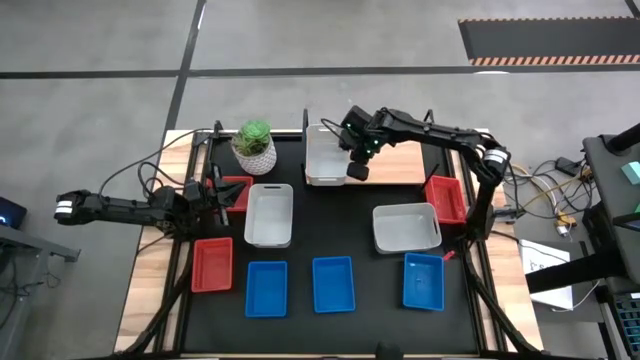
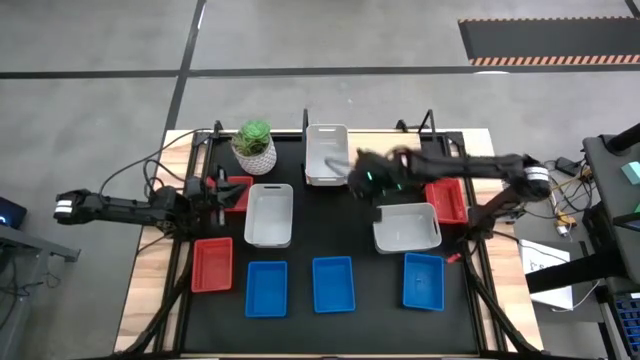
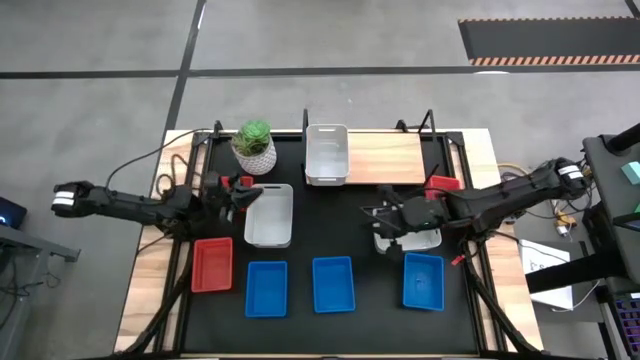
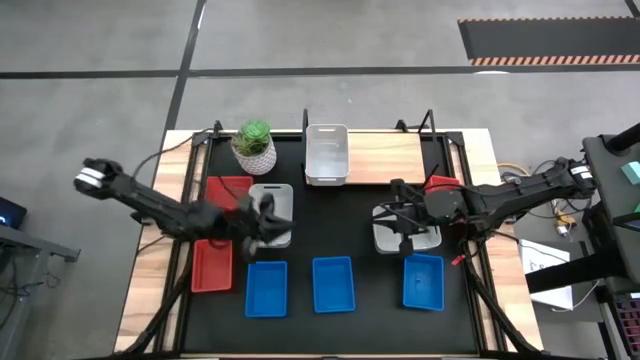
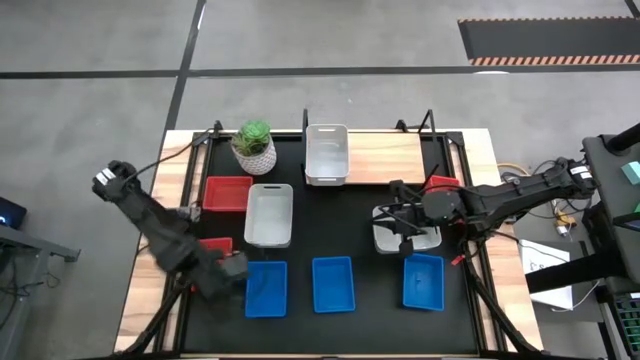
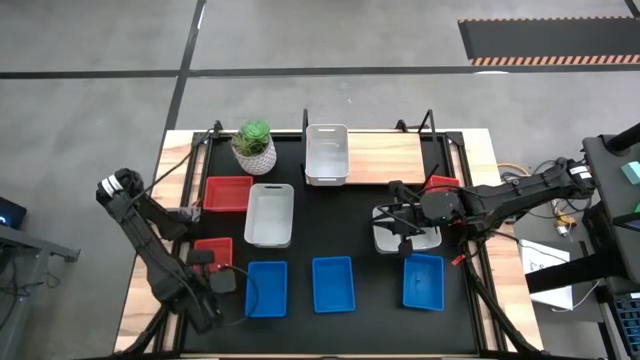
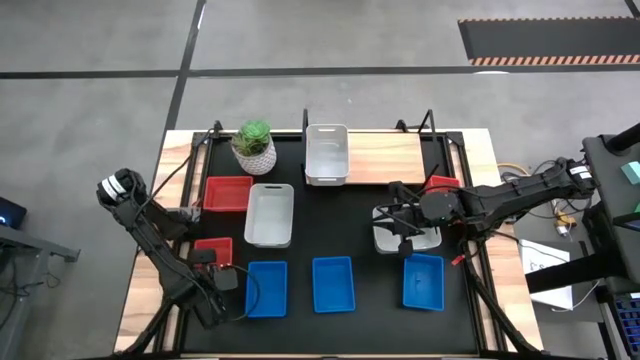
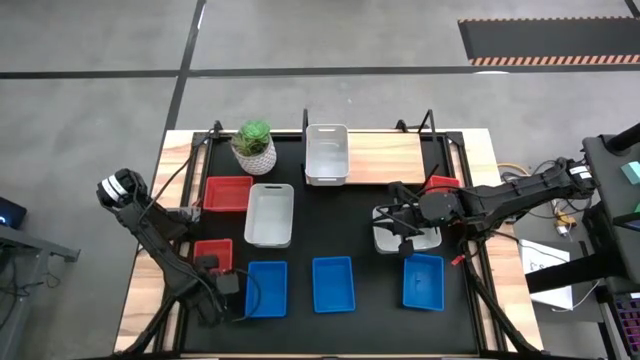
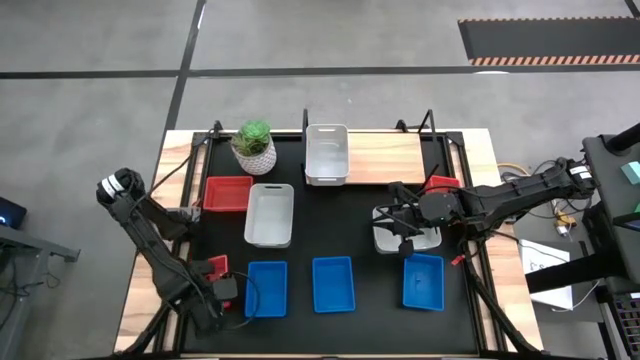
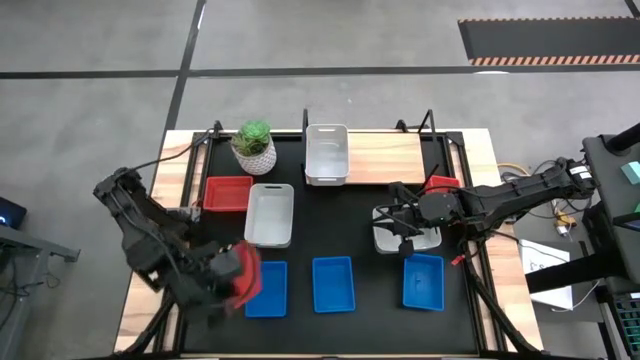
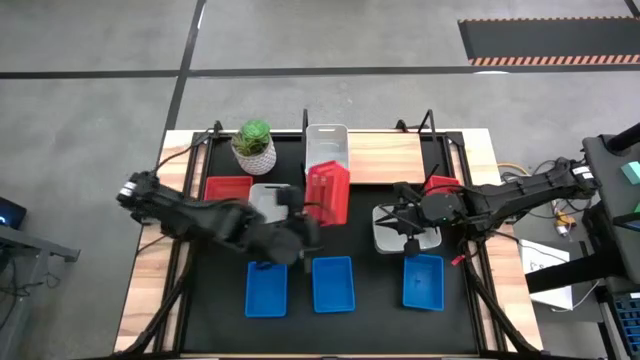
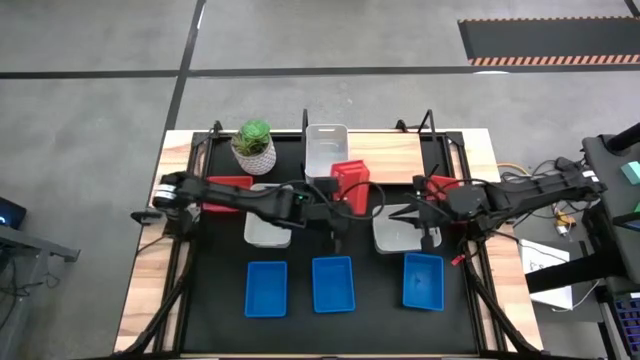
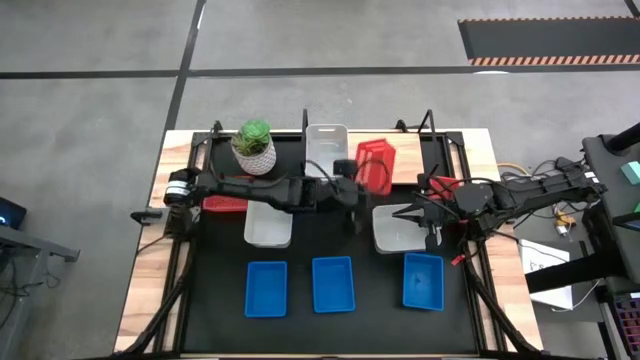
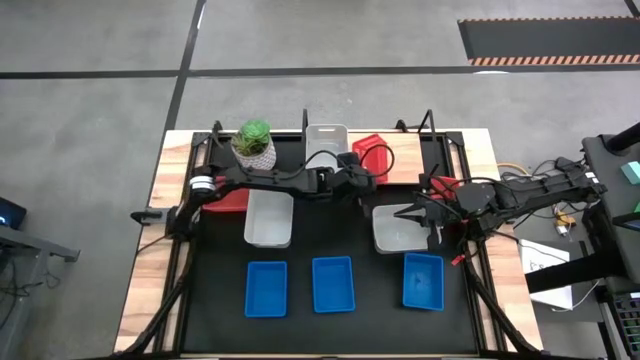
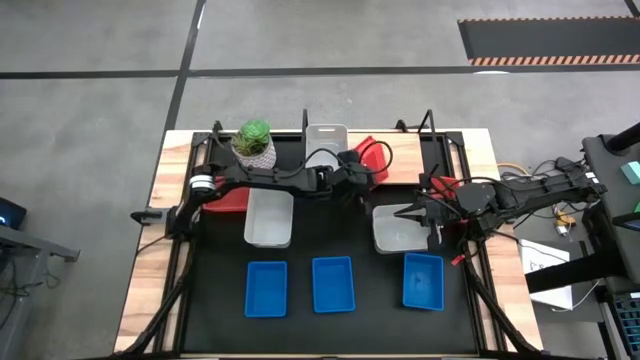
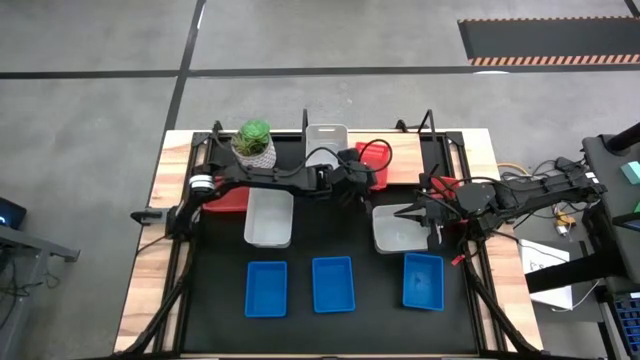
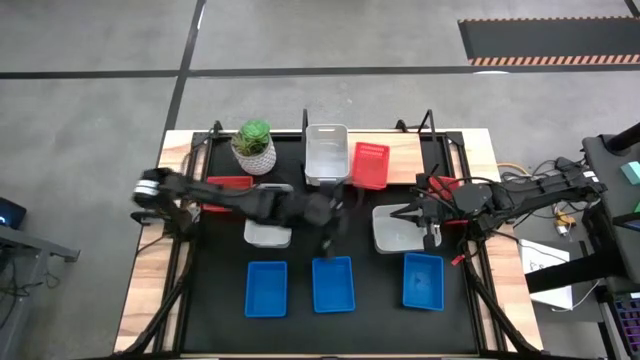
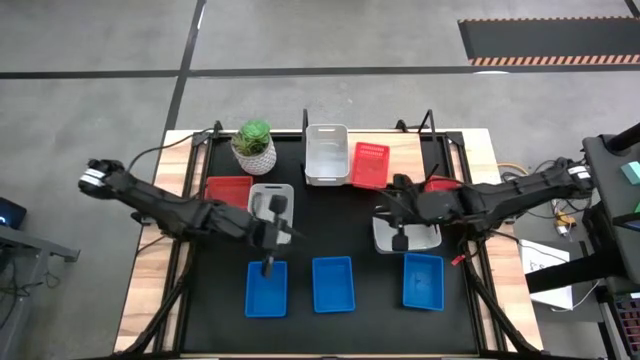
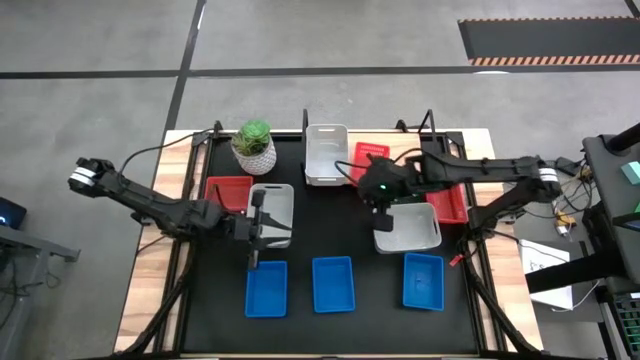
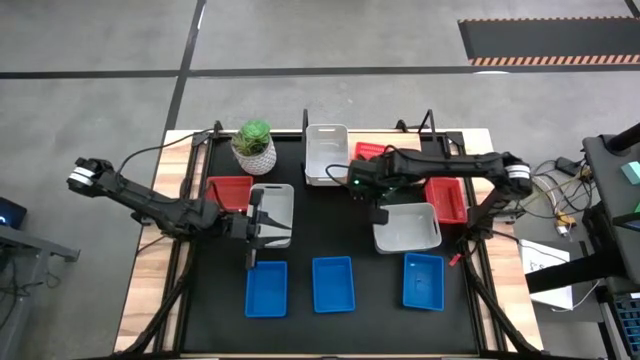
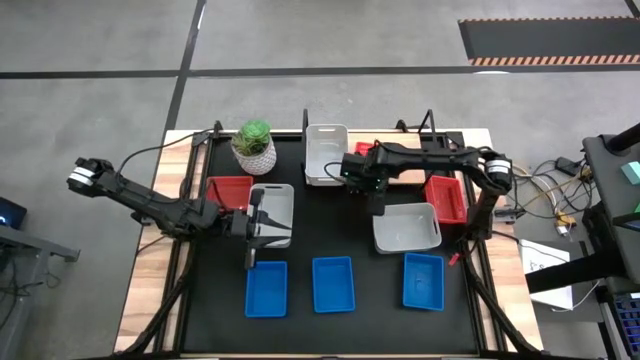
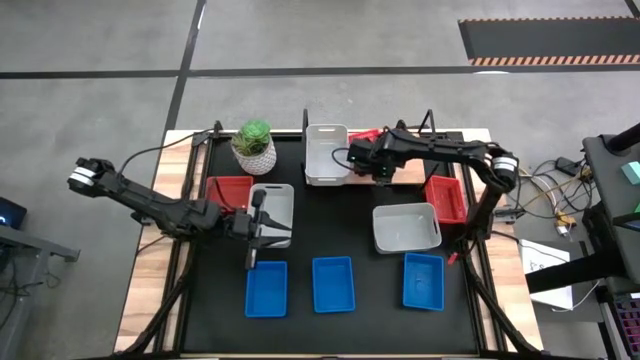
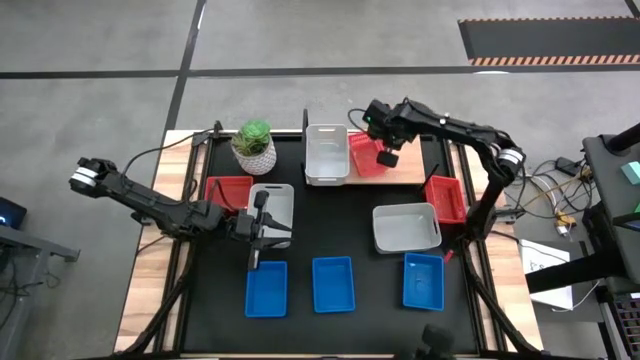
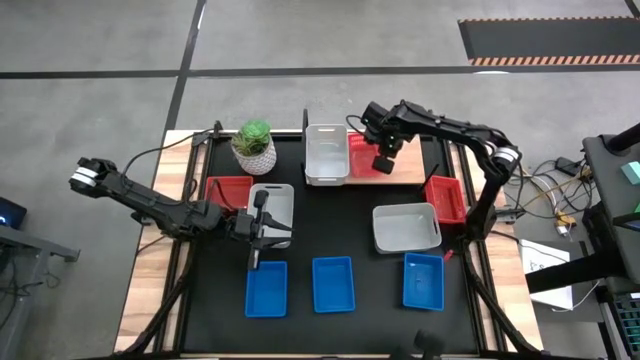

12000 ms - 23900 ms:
Task: Stack baskets on shelf by color
Put the bottom red bin on the shelf

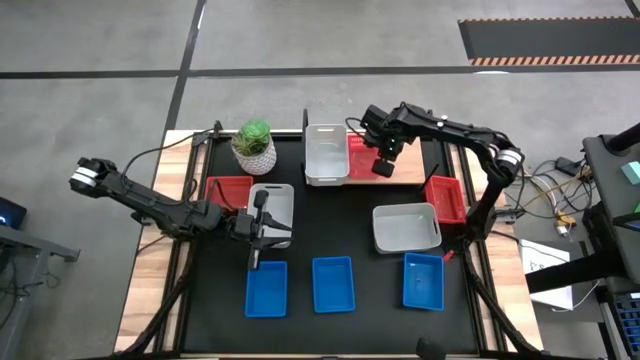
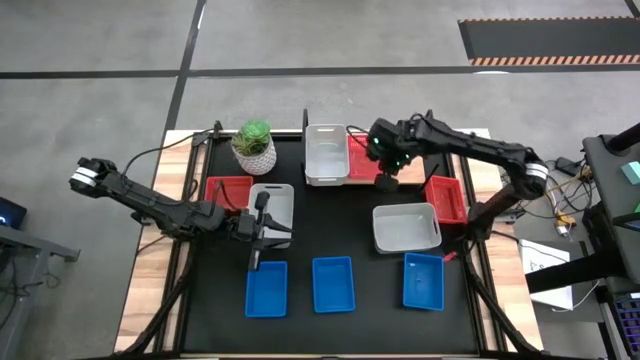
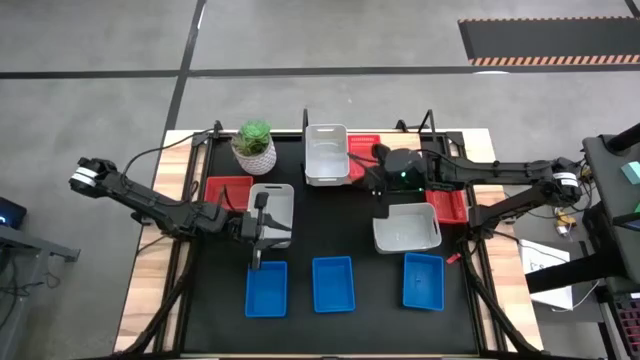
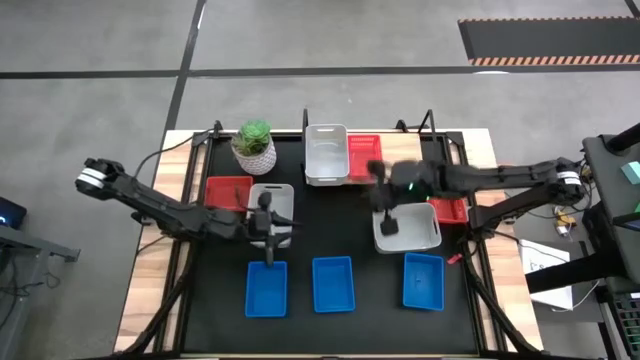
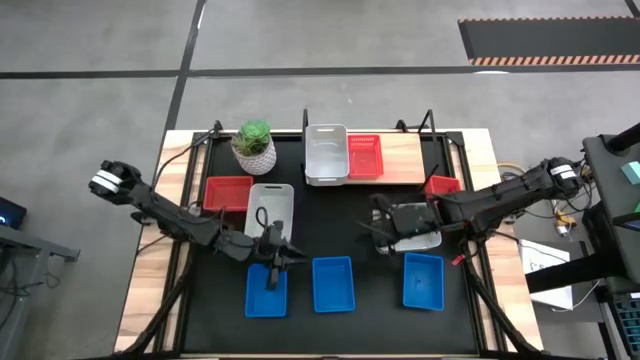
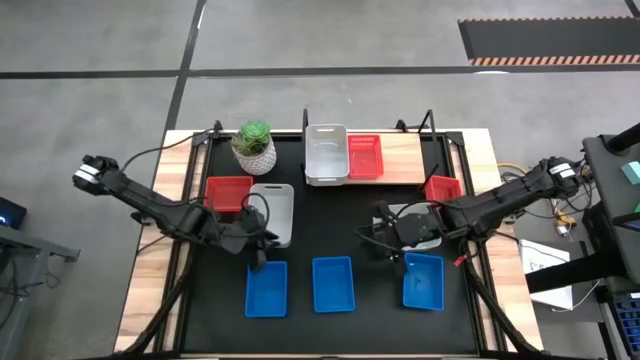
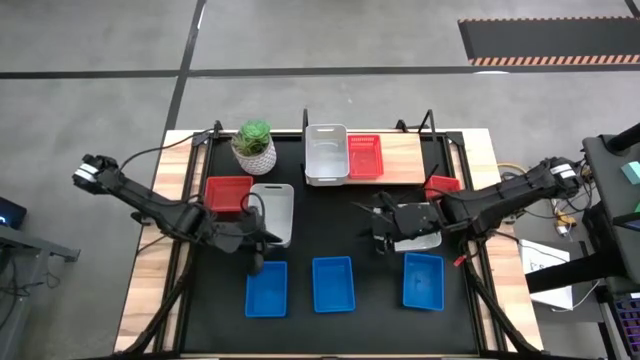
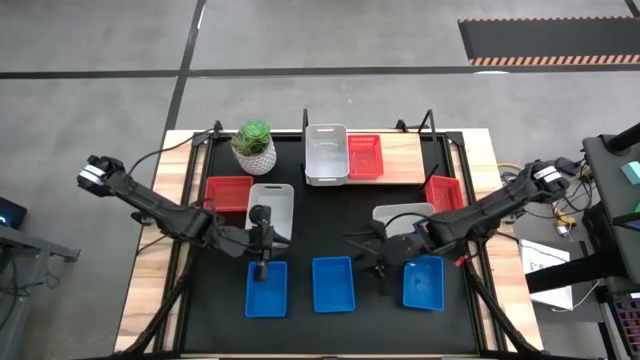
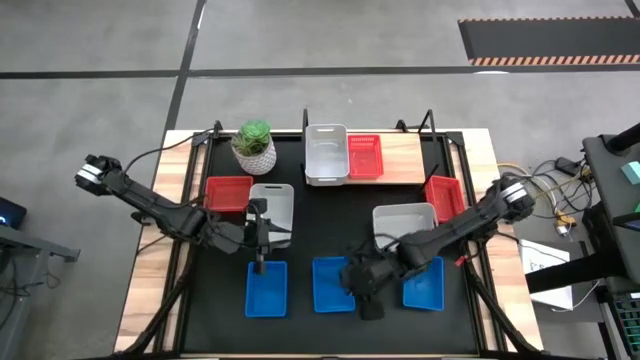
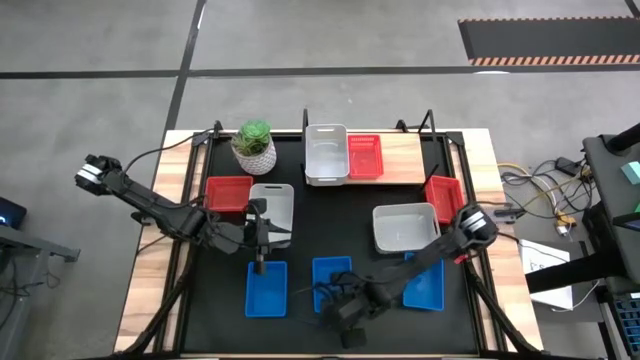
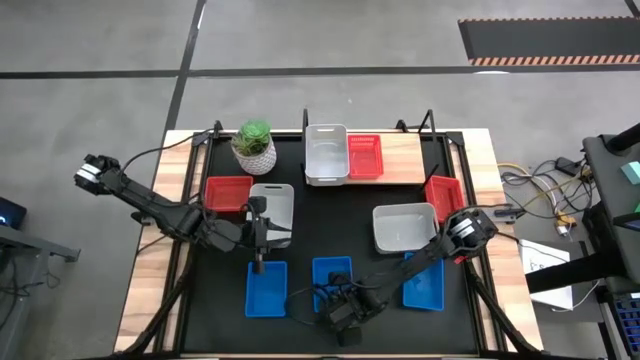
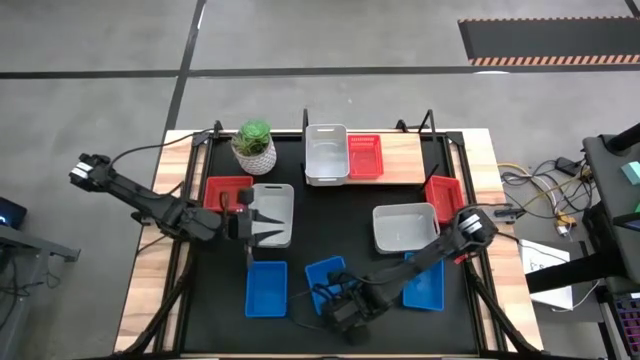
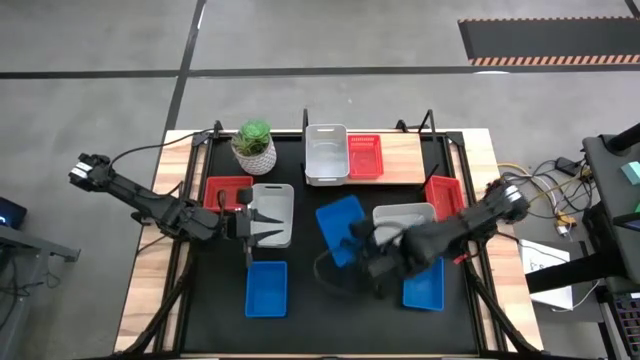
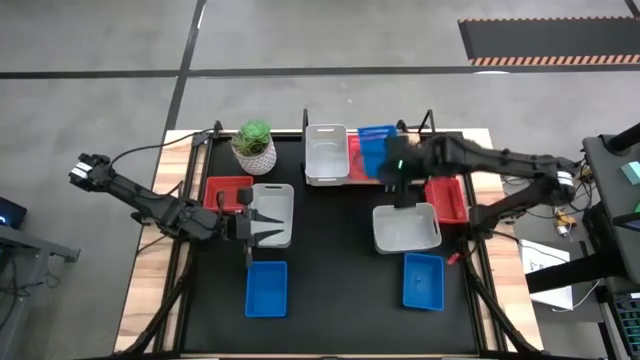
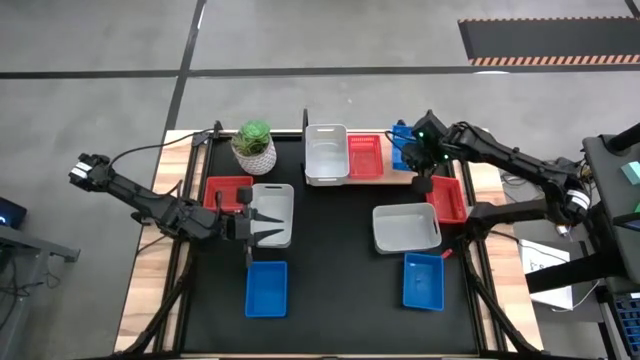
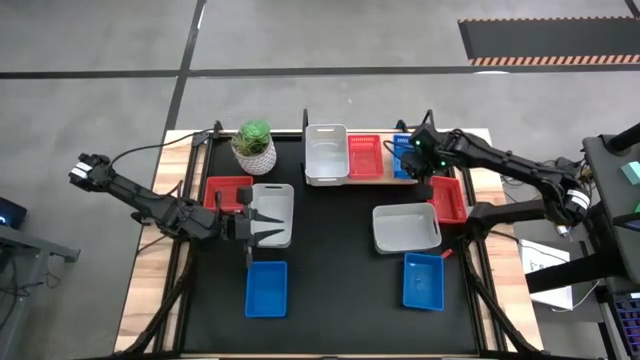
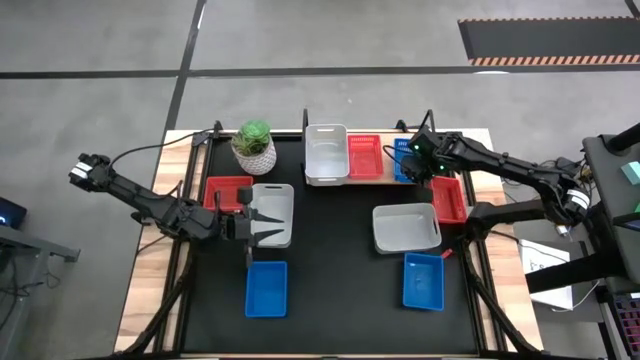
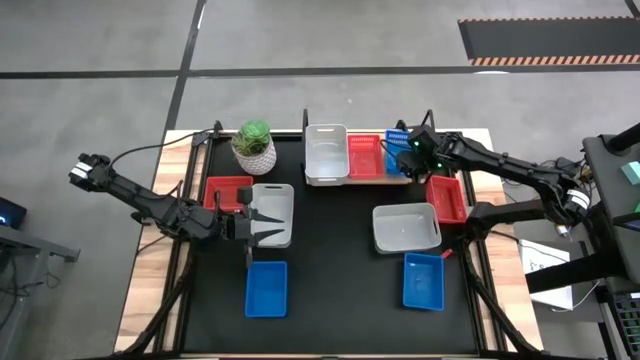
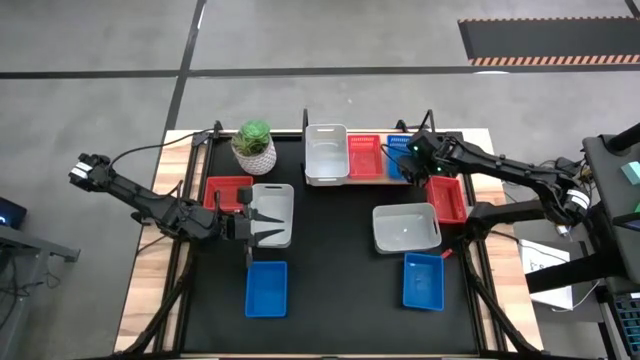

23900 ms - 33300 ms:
Put the middle blue bin on the shelf
